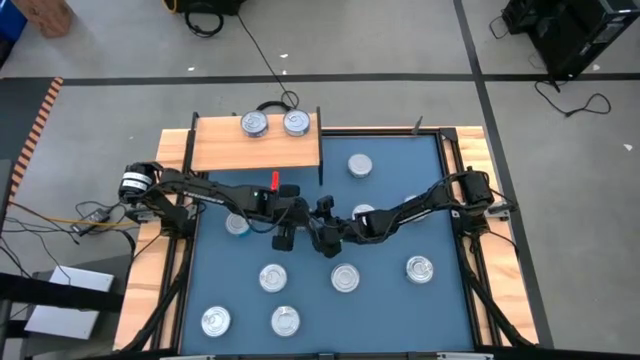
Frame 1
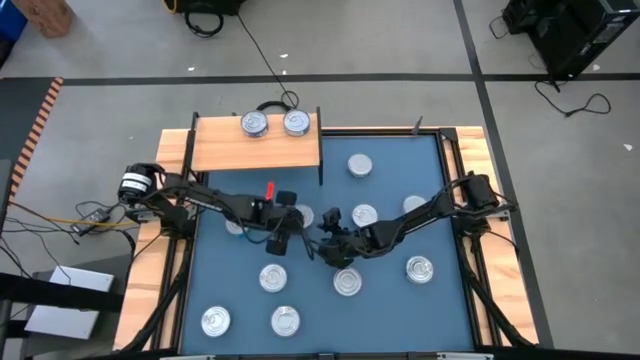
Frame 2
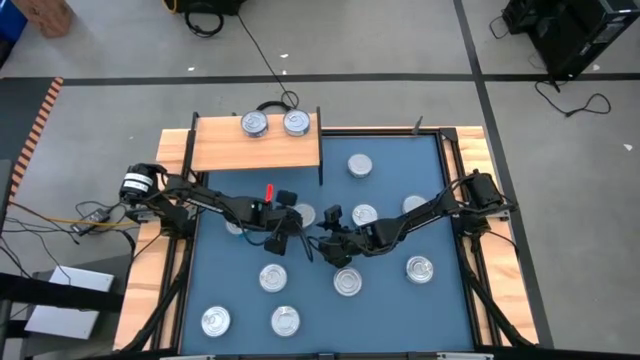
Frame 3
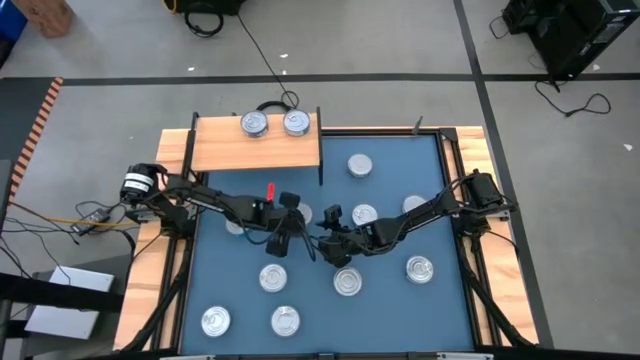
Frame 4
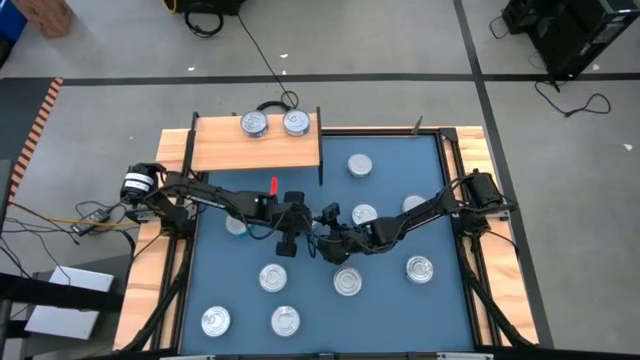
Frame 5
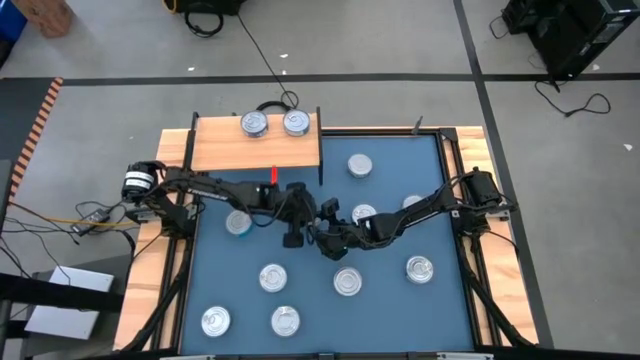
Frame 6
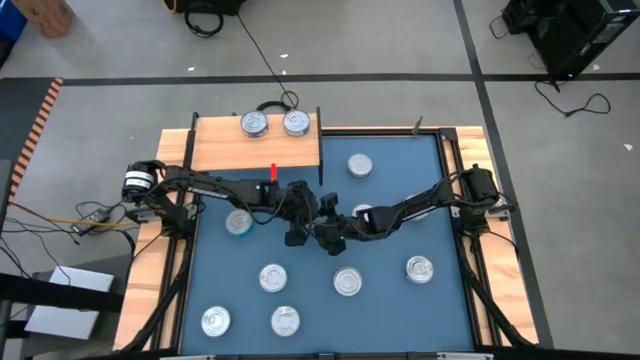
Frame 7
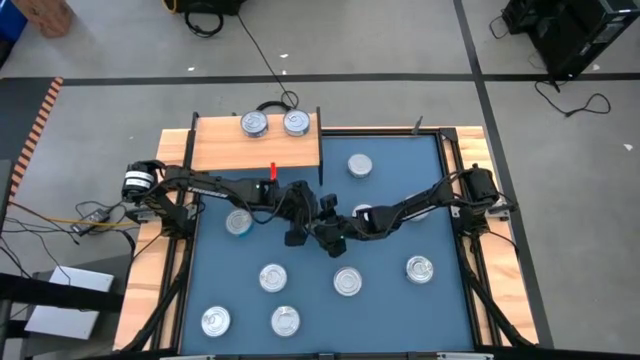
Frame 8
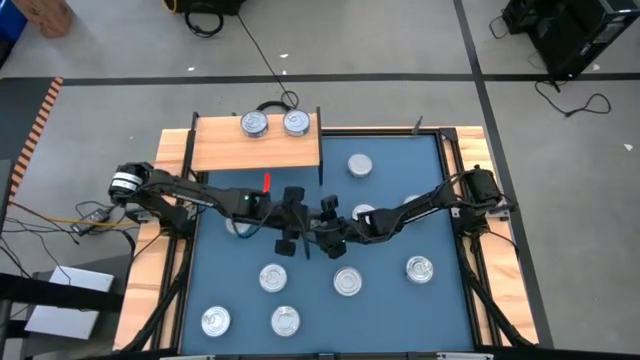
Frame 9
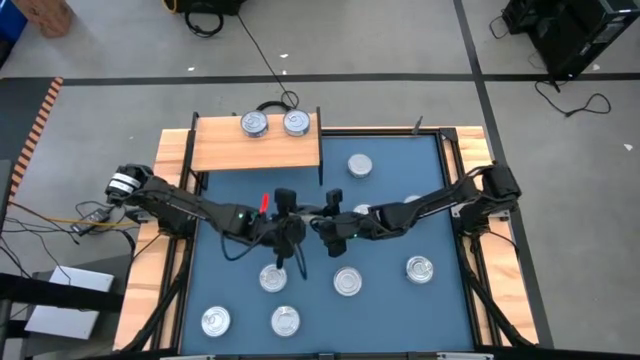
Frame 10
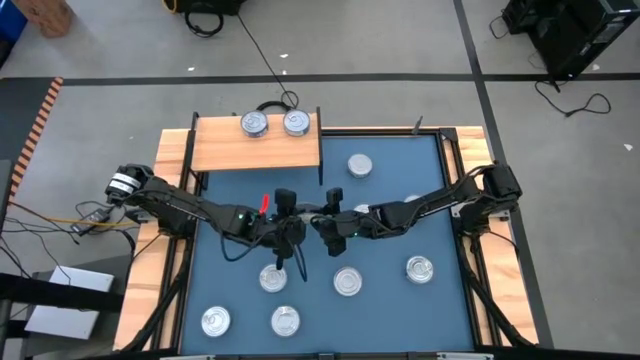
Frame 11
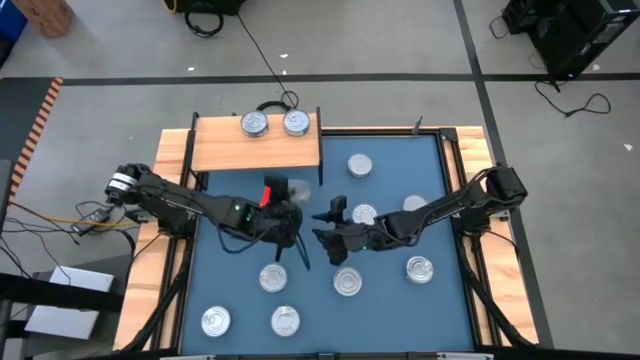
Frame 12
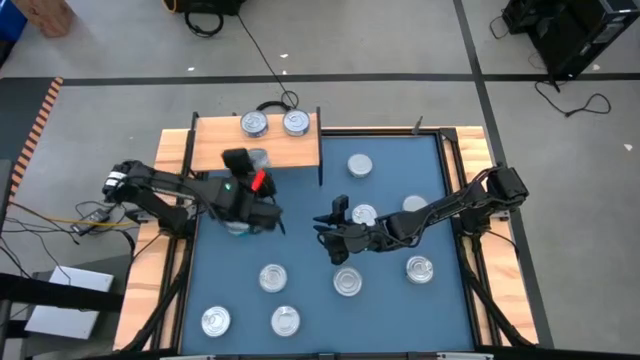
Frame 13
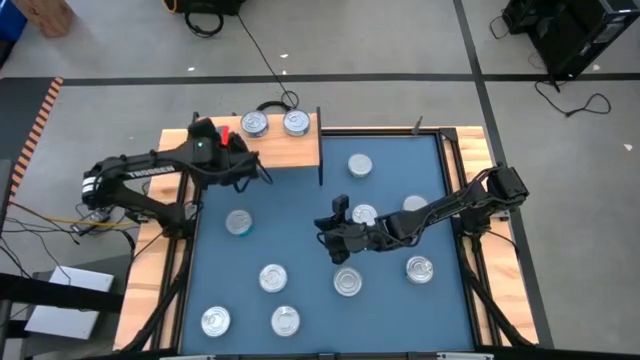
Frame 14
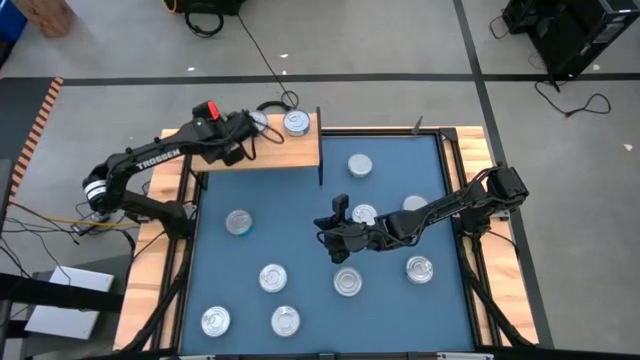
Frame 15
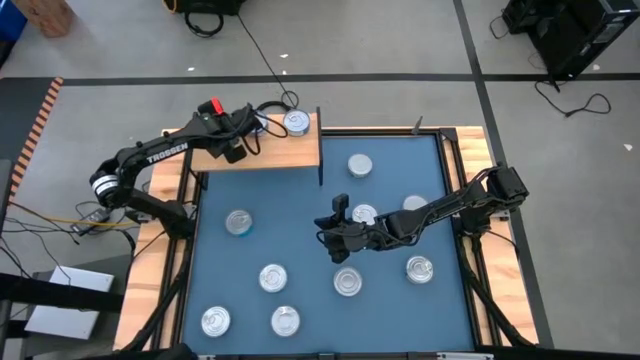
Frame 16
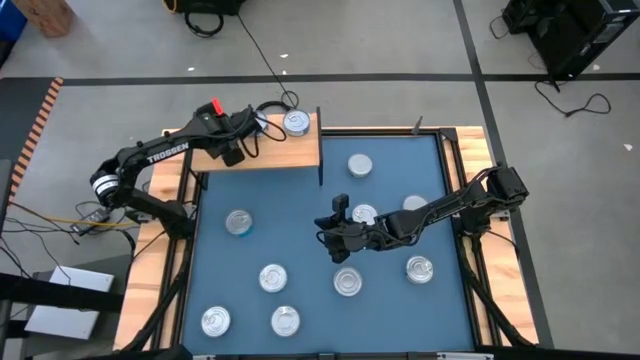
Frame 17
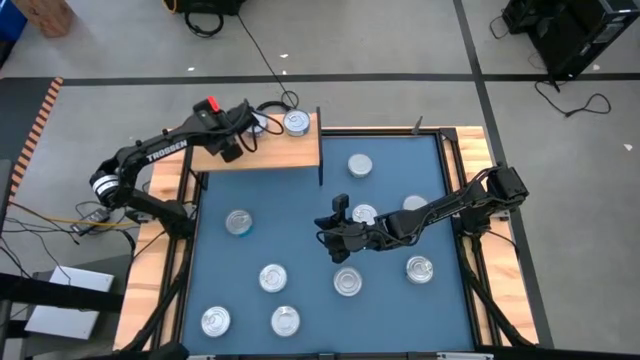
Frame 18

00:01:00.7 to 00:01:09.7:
Task: Stack canned seafood by type on shelf
Put the green white tuna can on the shelf

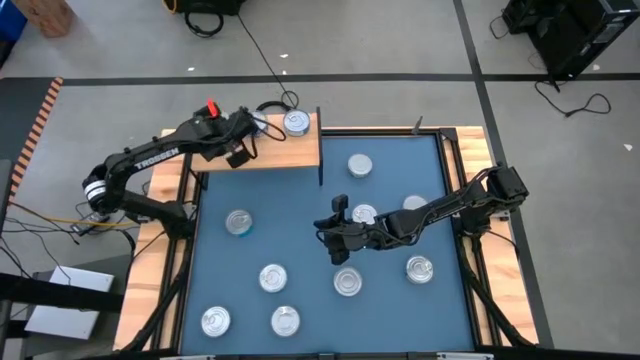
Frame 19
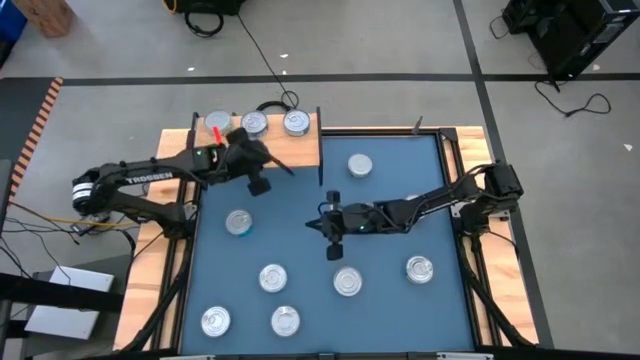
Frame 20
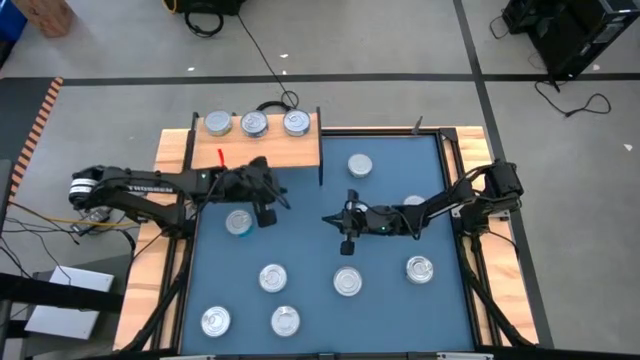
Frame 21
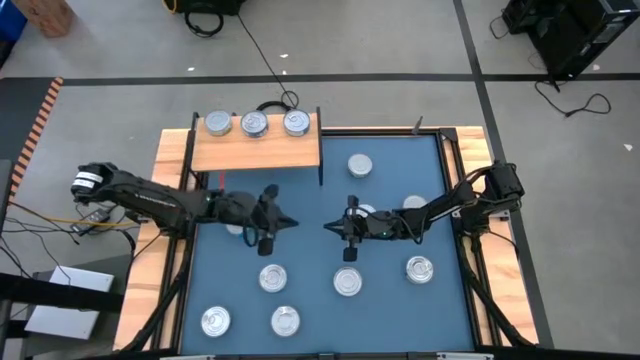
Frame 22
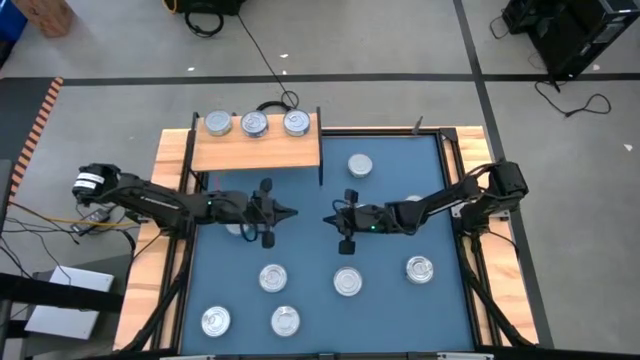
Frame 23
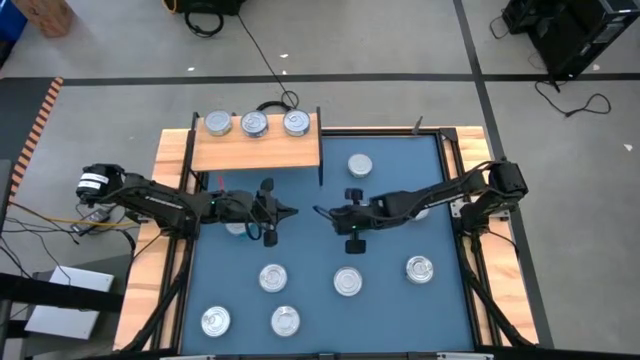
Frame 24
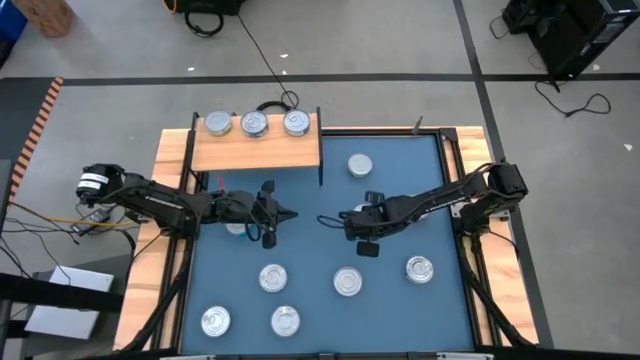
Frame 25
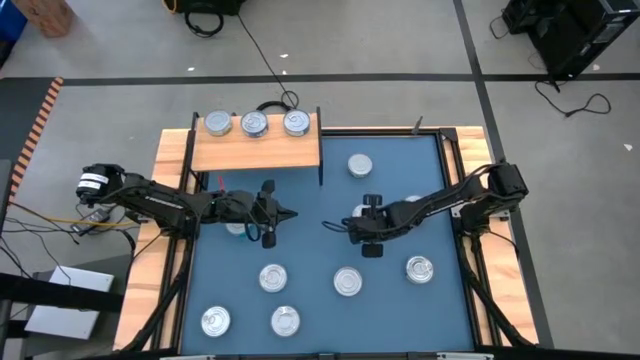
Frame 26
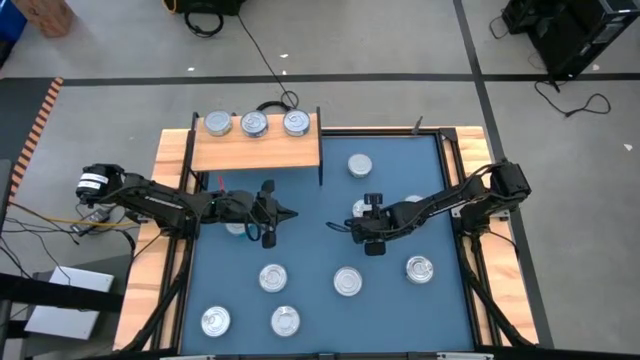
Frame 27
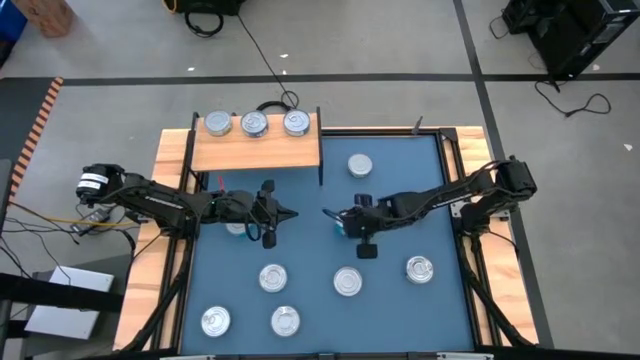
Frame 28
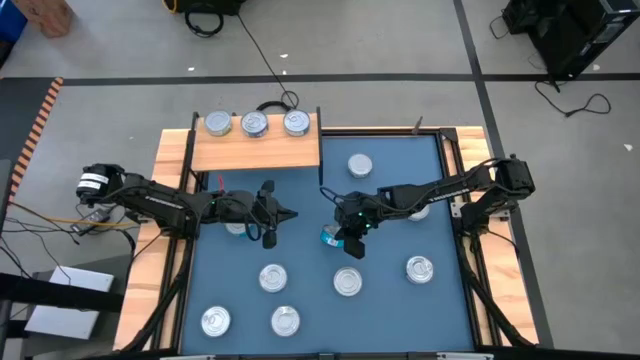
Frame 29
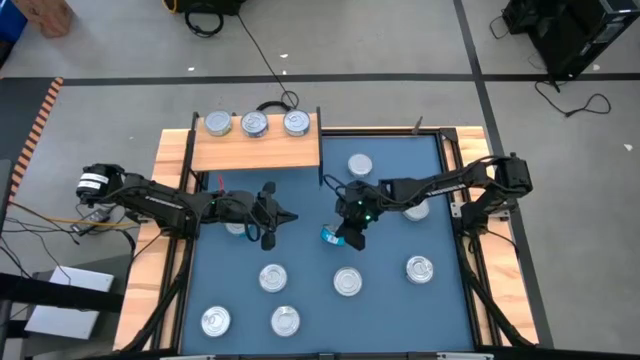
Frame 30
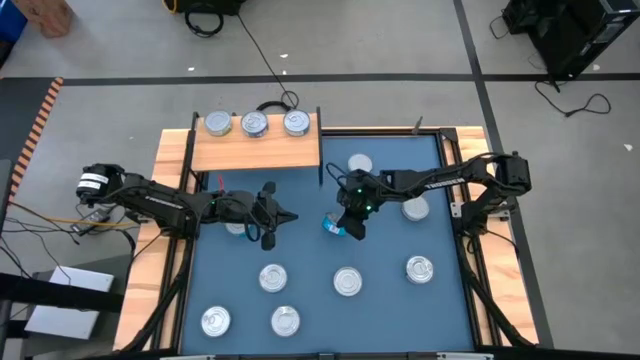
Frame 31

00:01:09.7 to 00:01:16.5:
Stack the yellow blue tuna can on top of the yellow blue tuna can on the shelf
